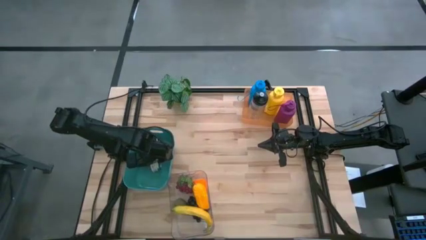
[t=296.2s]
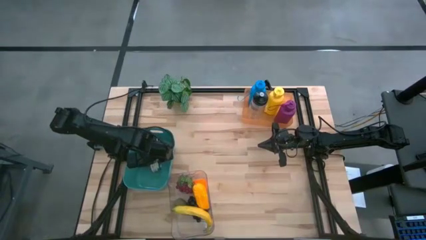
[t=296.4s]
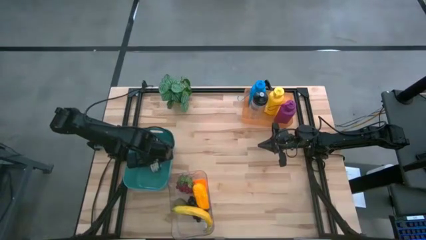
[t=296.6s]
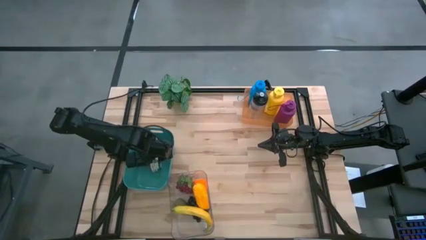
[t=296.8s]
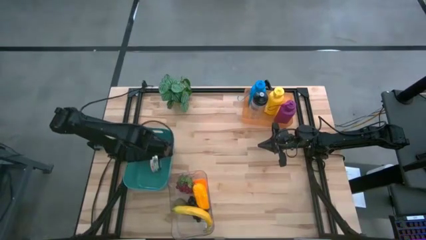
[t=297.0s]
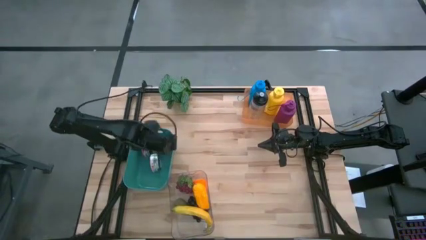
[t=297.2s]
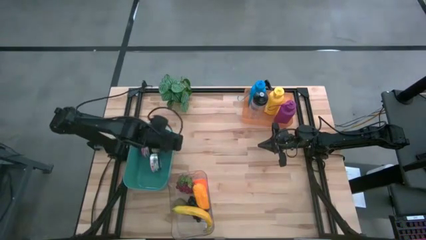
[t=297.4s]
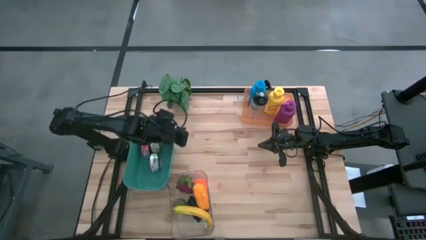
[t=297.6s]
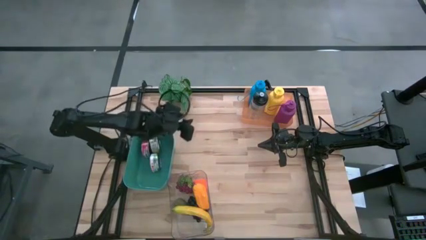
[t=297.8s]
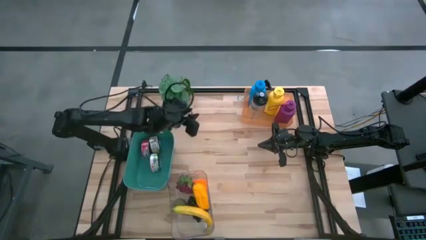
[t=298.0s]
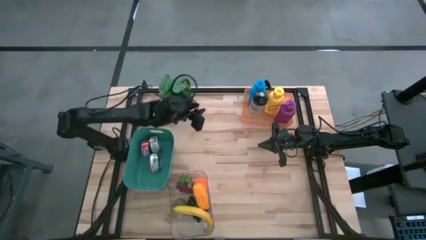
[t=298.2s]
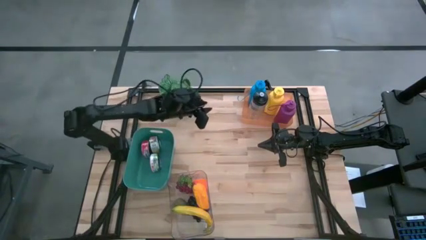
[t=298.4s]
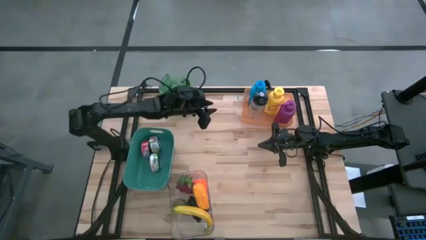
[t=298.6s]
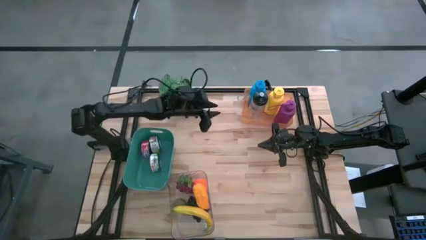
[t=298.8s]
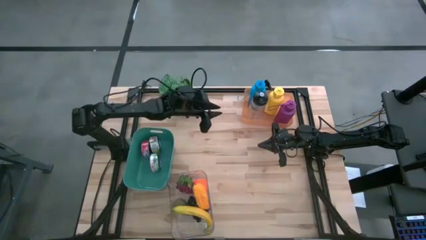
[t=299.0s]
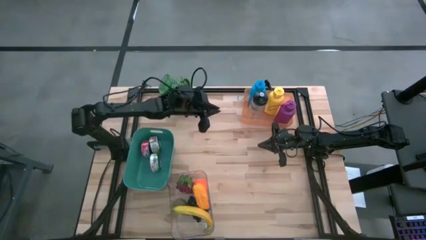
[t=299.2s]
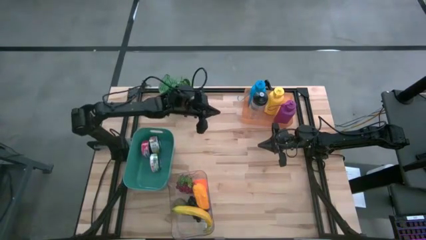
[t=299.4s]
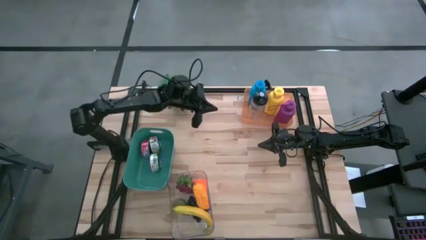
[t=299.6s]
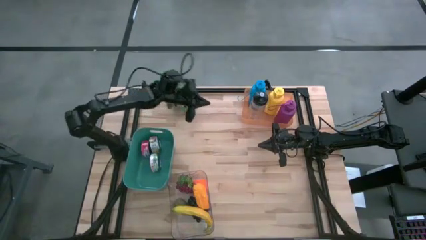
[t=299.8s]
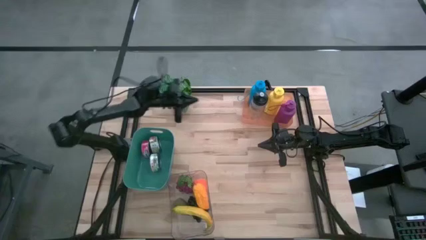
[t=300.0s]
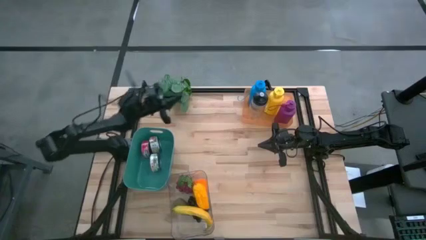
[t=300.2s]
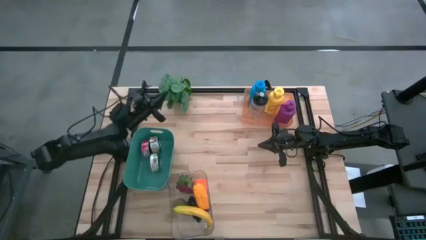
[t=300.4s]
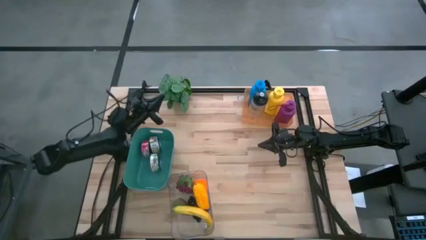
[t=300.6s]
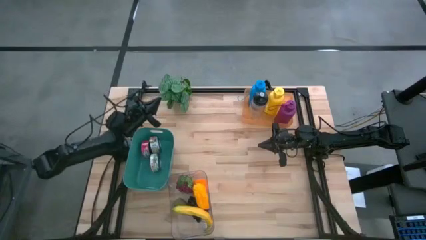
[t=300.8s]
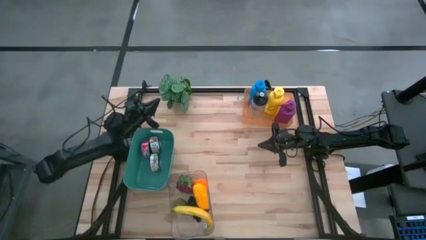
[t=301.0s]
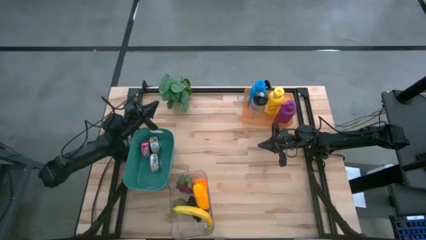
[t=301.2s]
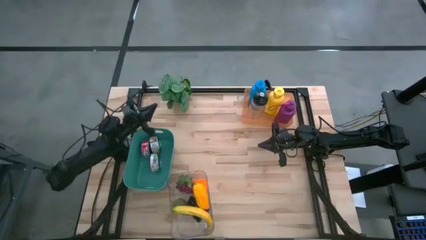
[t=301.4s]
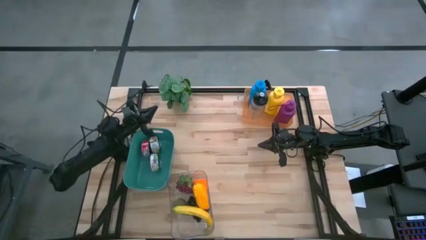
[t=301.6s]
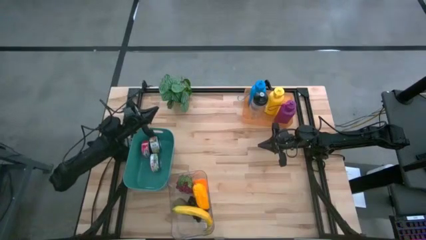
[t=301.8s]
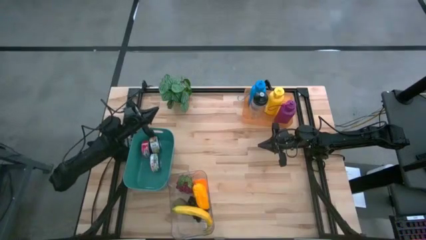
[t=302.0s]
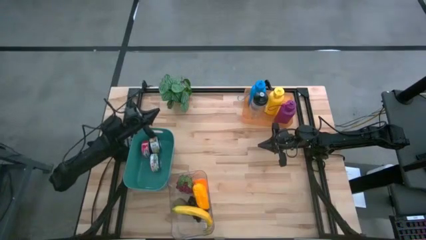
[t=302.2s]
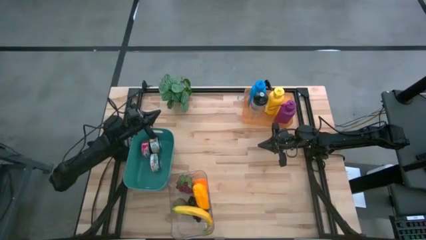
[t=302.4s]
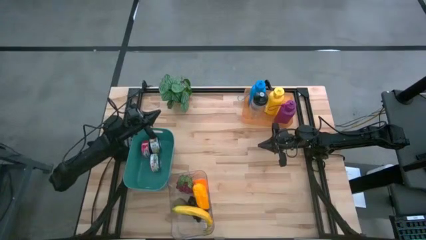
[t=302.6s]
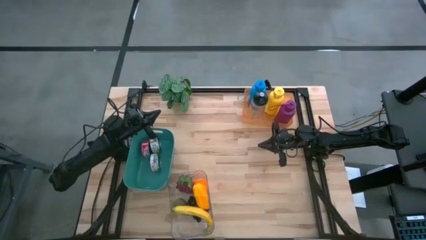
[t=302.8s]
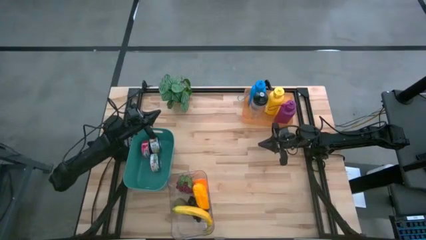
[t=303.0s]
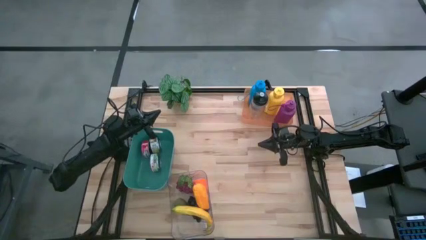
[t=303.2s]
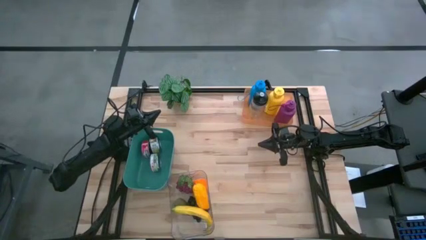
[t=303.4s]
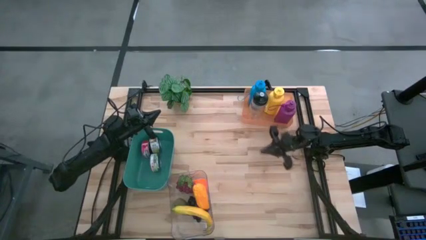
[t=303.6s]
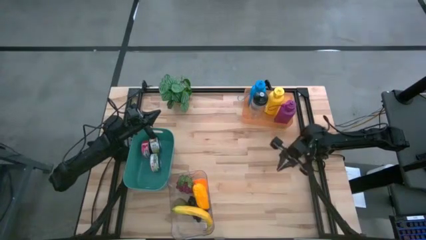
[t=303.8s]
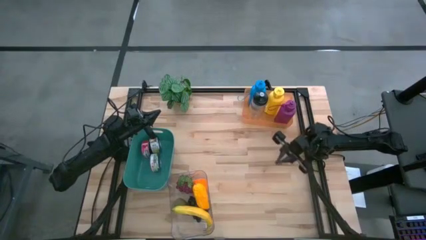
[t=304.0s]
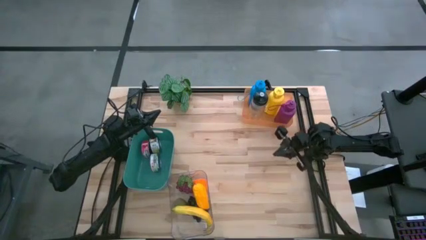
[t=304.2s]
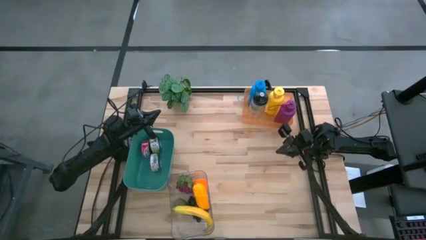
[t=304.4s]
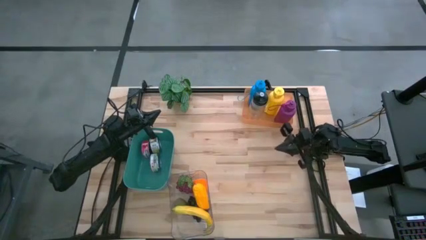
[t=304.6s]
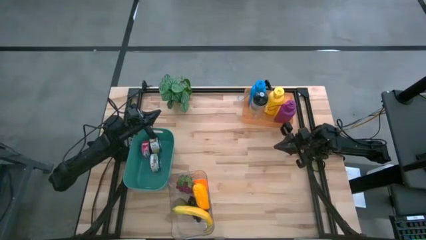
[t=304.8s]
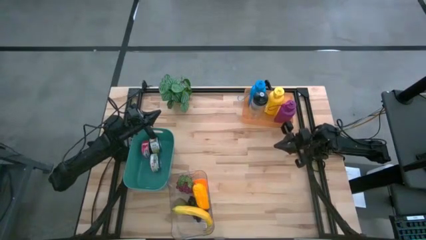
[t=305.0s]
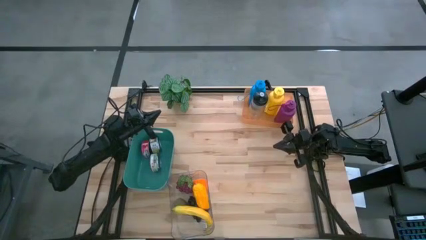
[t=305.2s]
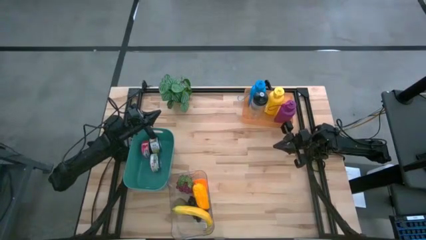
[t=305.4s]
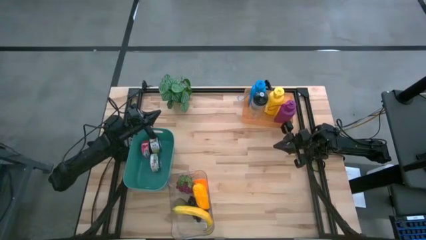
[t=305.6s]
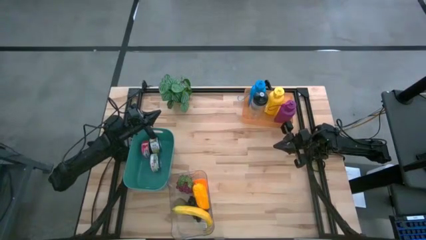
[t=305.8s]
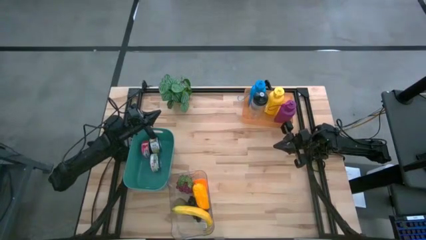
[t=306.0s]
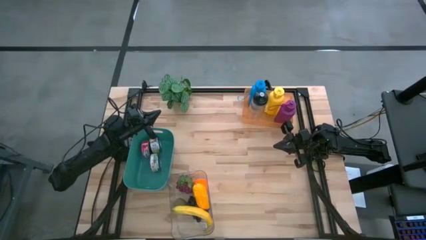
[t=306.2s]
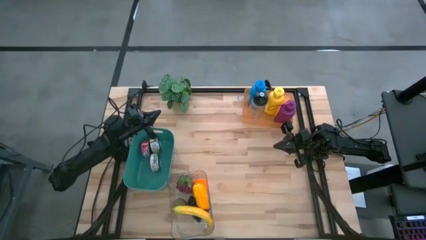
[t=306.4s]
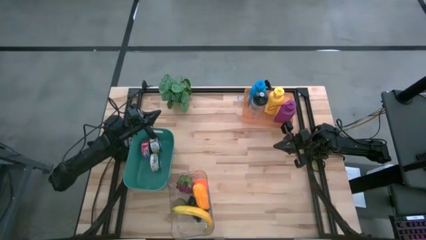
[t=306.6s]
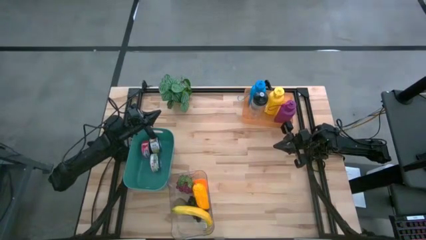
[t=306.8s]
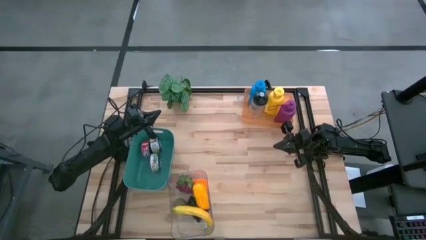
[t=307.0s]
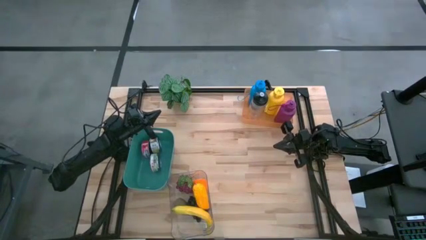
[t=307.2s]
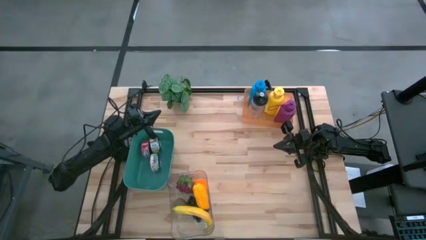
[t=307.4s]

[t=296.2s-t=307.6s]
Task: Pick & Place Food Item
Return to Home Position

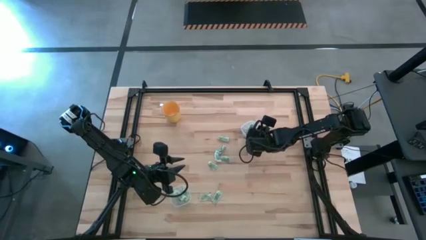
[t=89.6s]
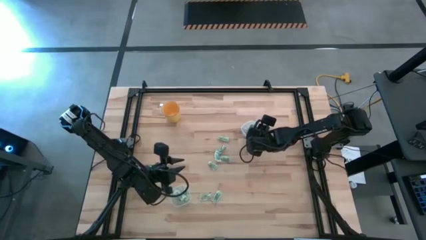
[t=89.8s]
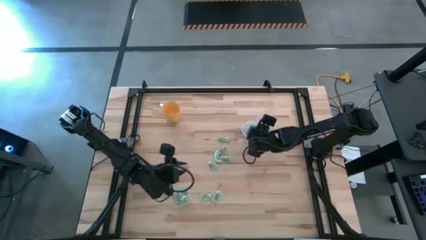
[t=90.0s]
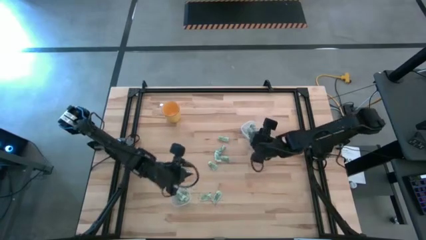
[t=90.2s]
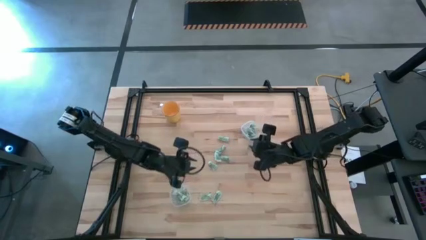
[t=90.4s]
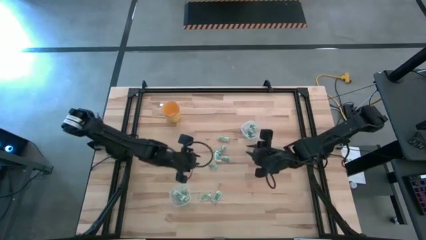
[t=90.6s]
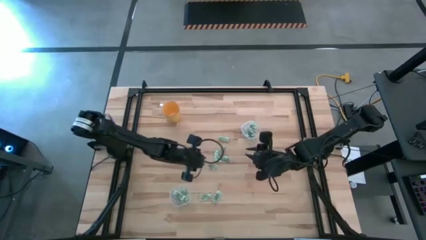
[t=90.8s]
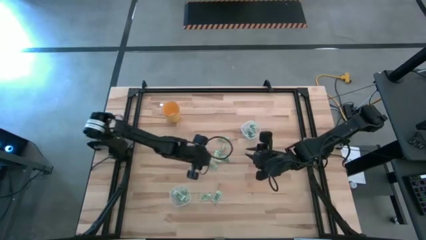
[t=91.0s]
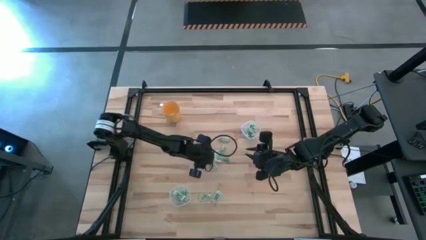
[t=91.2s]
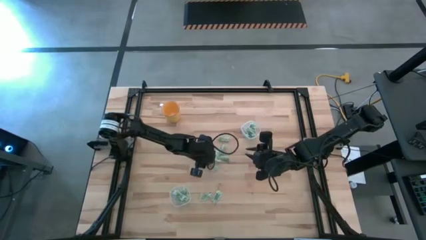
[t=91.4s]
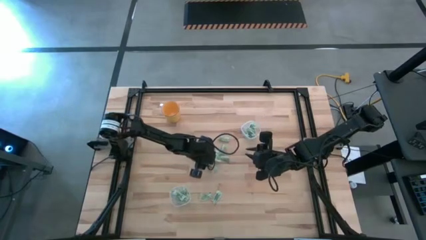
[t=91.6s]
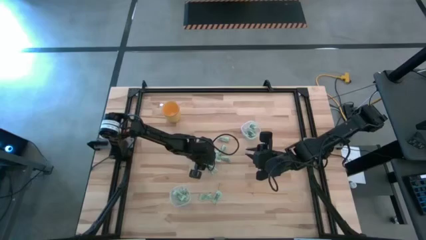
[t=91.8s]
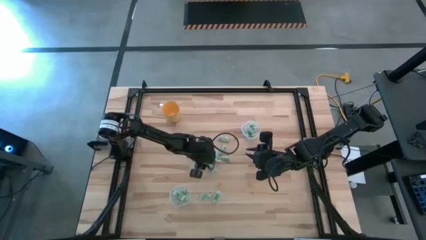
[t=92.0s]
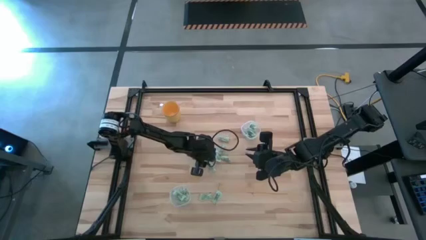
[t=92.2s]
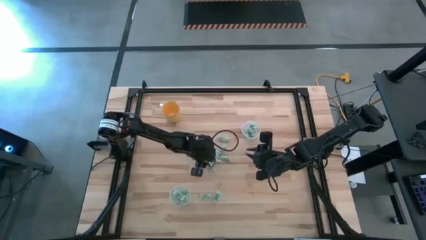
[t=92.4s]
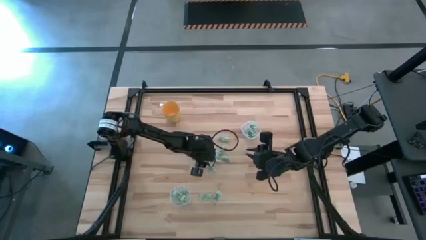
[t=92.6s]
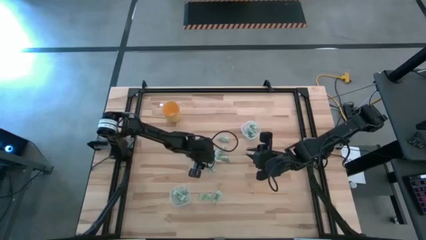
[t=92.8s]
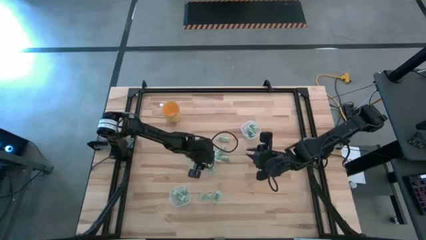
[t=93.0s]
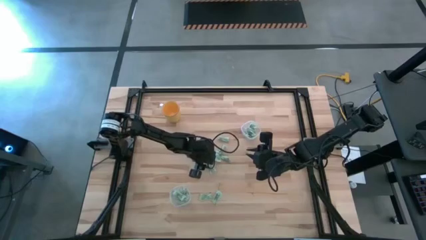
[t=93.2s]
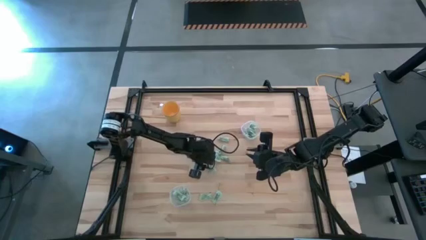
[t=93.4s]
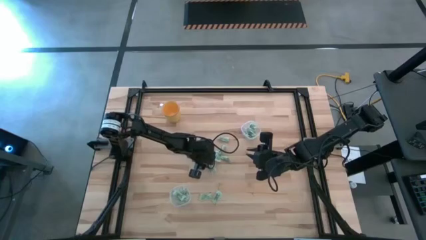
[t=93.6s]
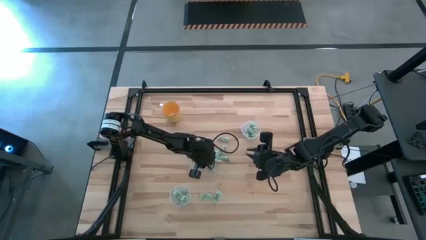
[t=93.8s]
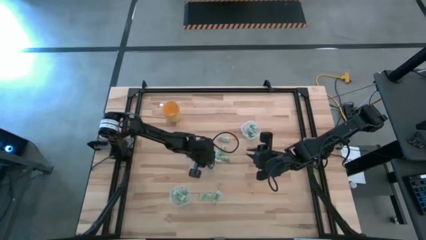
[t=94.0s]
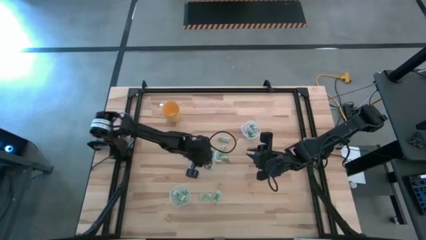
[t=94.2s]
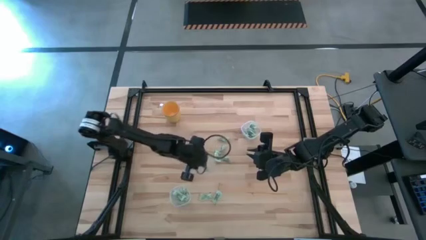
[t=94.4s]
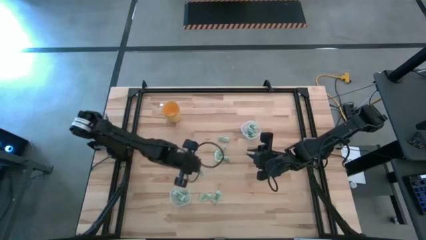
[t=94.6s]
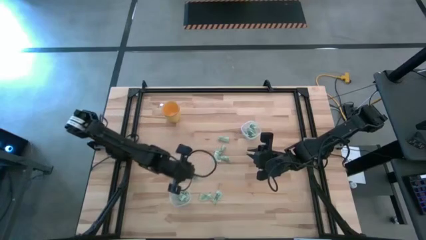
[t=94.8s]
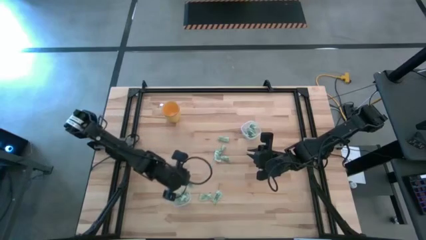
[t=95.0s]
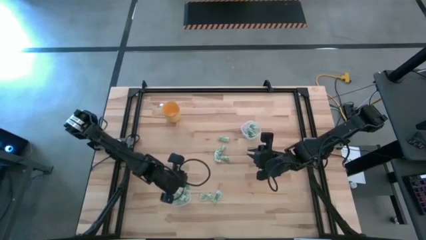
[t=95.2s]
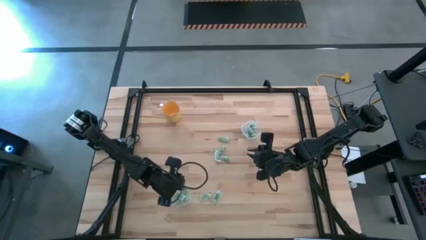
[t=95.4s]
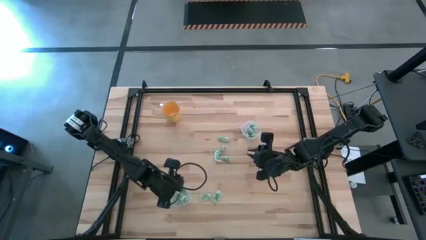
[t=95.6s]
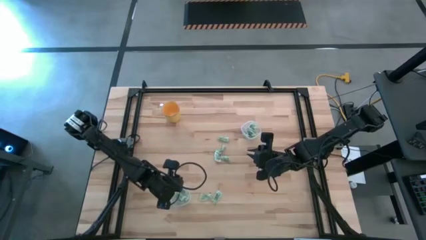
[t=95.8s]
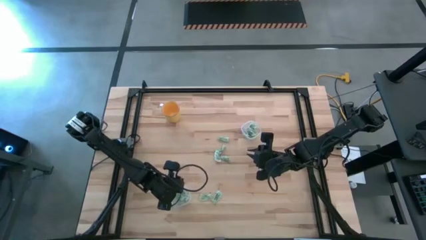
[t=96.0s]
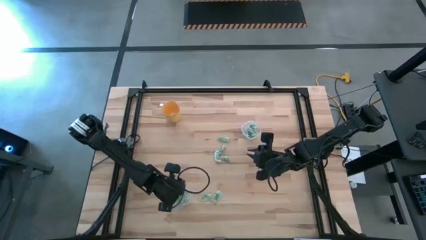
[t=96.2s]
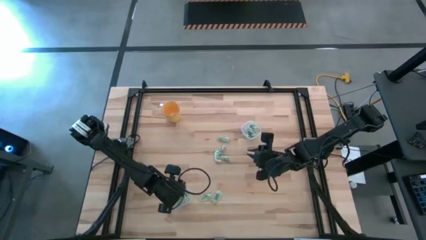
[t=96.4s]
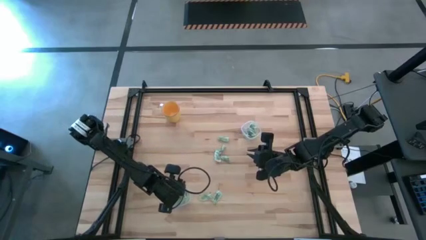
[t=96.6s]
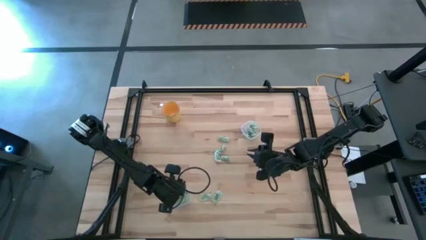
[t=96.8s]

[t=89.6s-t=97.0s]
Task: Pick and place Stevia / Truvia into bins
Put the green stevia packet into the bottom transparent container
